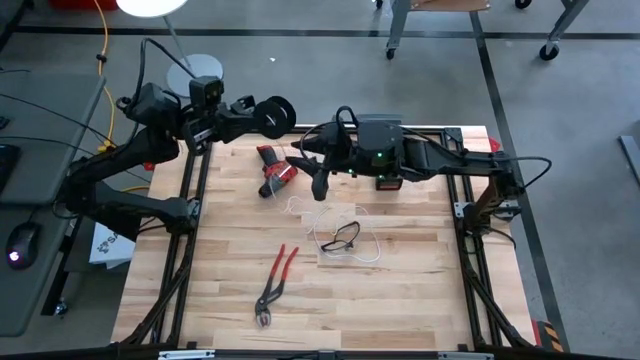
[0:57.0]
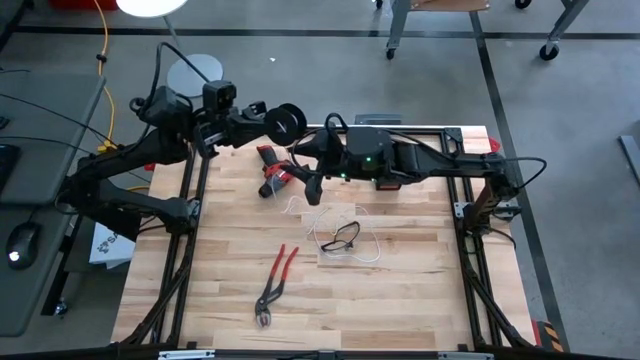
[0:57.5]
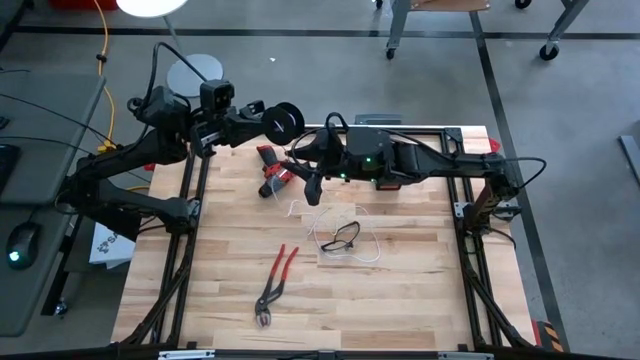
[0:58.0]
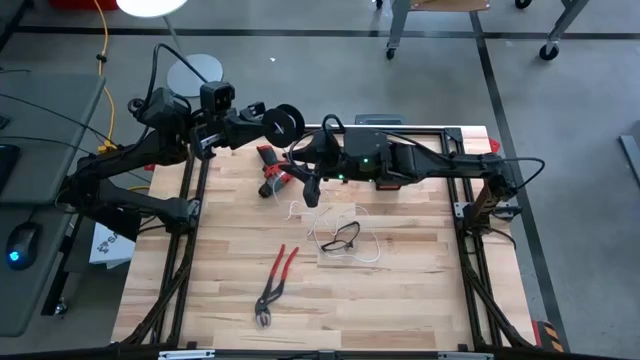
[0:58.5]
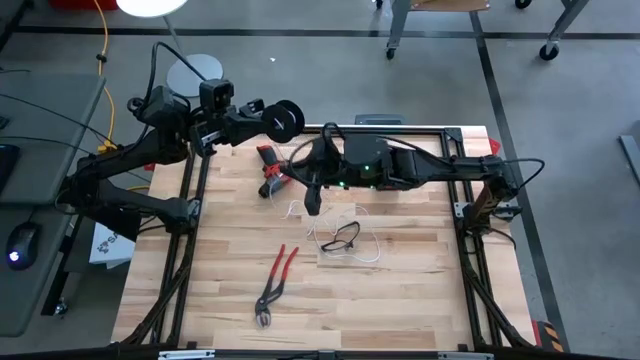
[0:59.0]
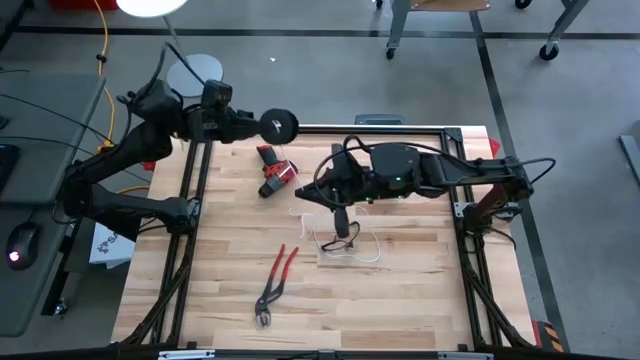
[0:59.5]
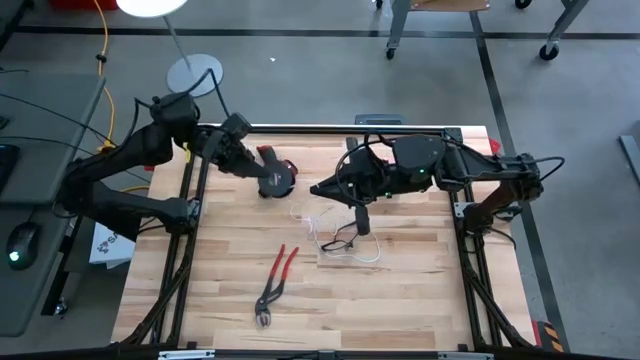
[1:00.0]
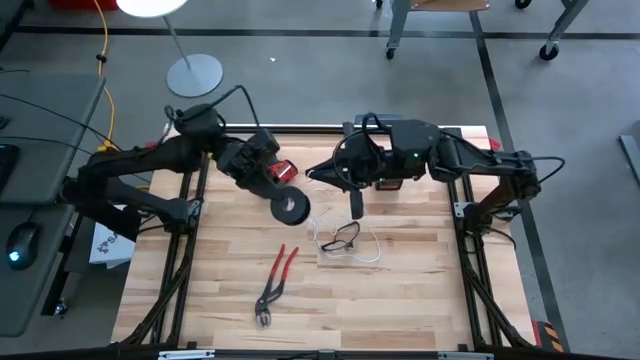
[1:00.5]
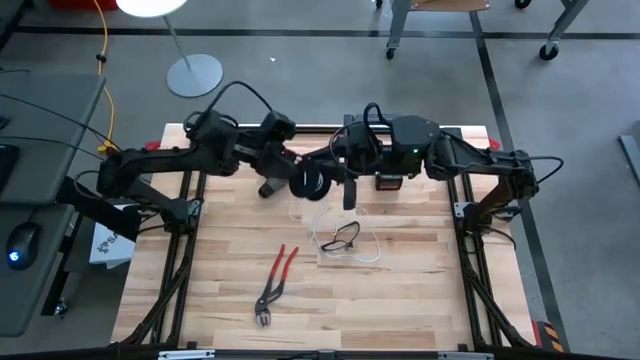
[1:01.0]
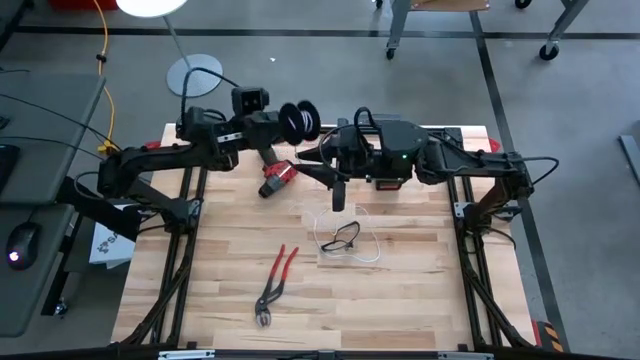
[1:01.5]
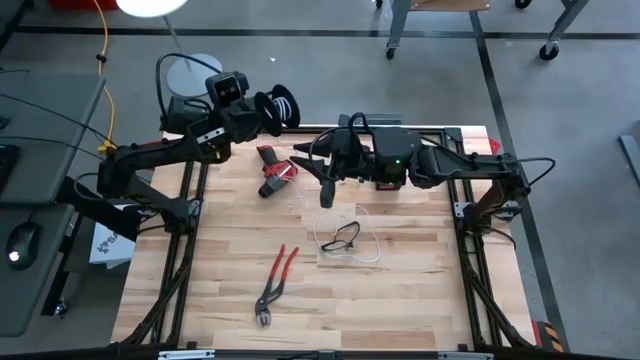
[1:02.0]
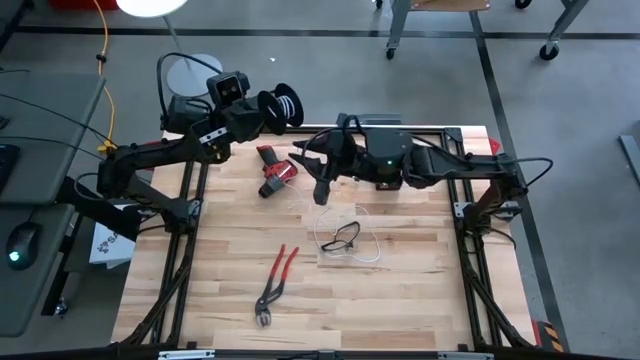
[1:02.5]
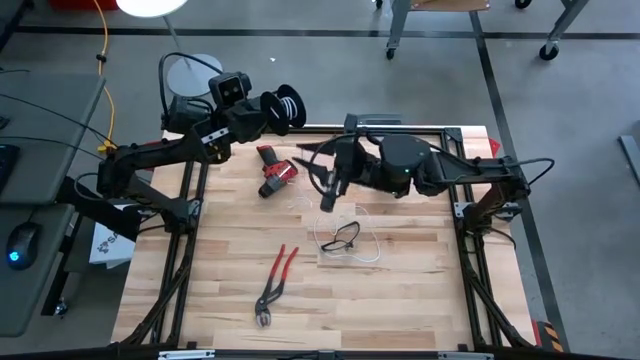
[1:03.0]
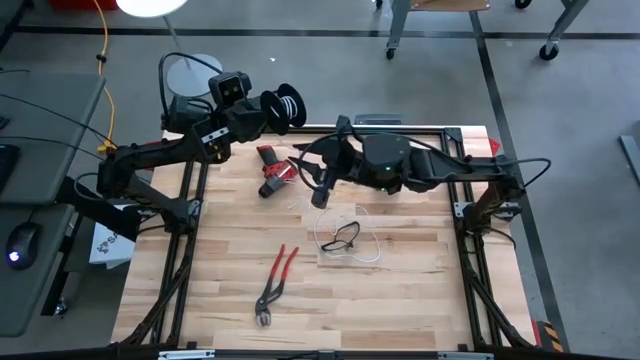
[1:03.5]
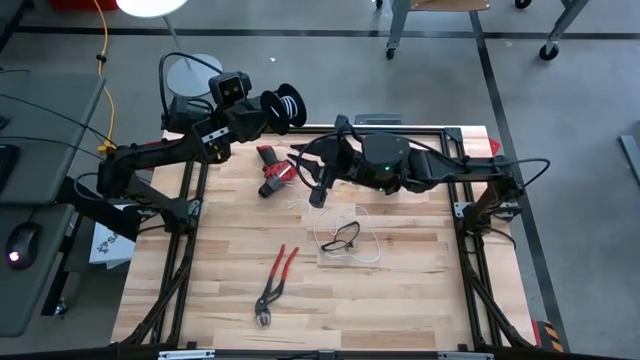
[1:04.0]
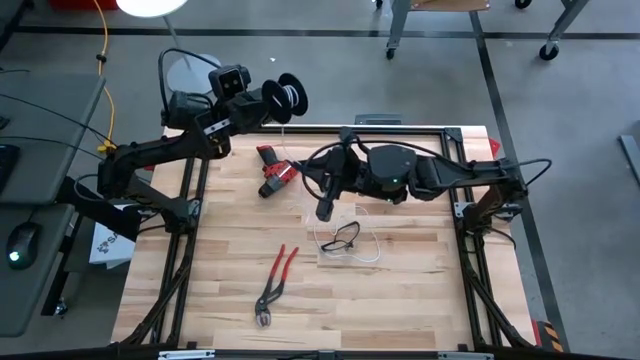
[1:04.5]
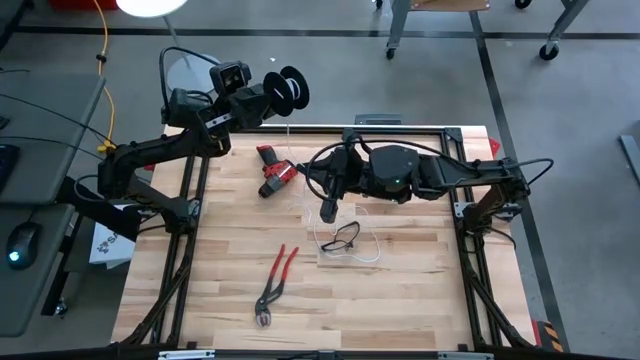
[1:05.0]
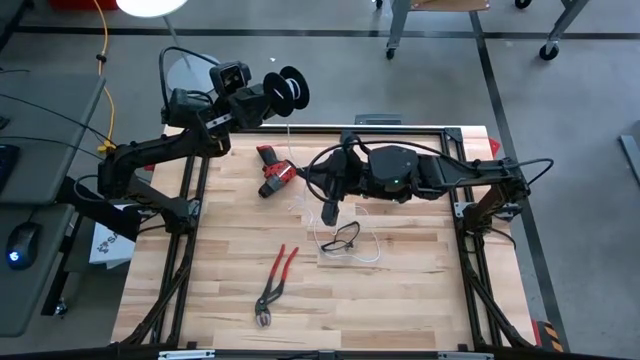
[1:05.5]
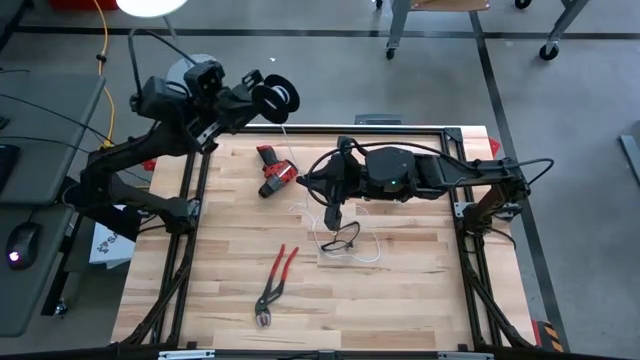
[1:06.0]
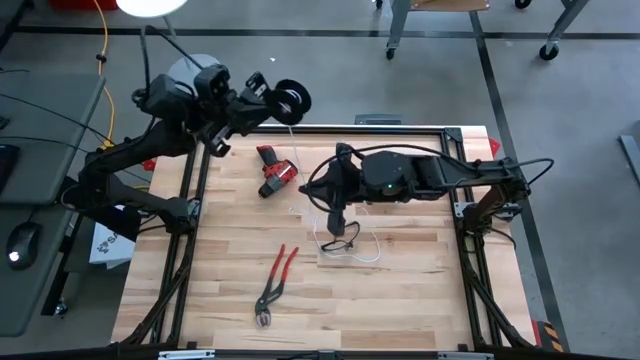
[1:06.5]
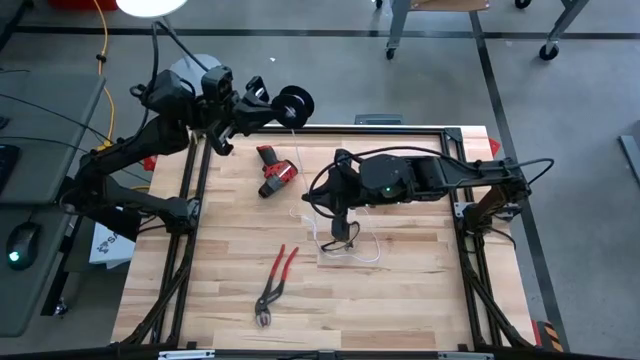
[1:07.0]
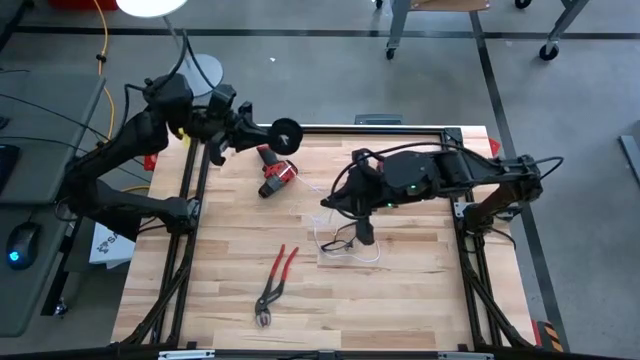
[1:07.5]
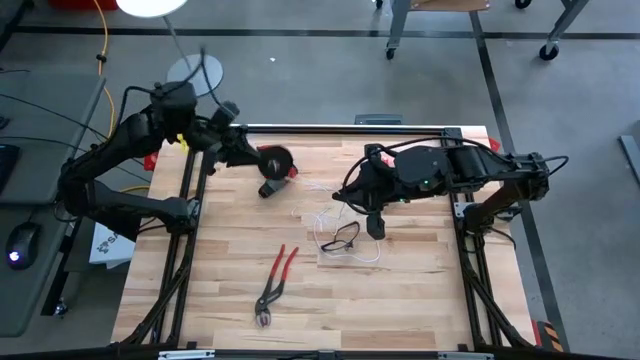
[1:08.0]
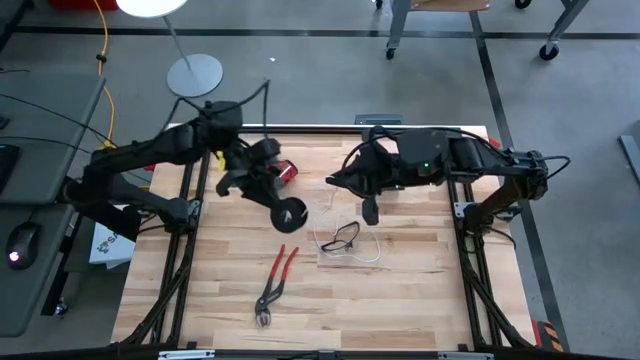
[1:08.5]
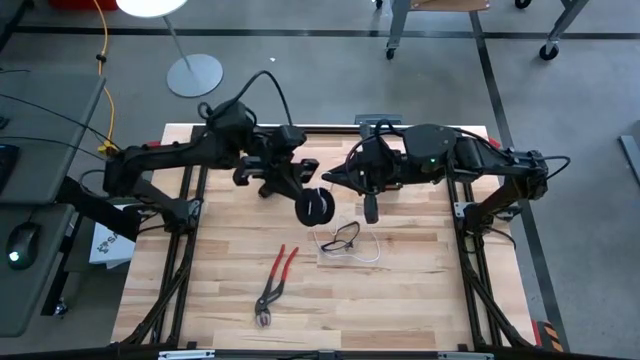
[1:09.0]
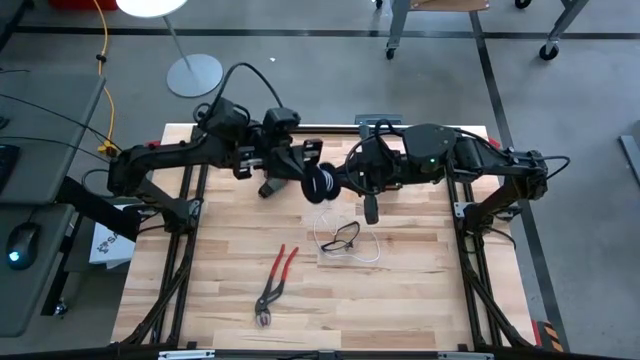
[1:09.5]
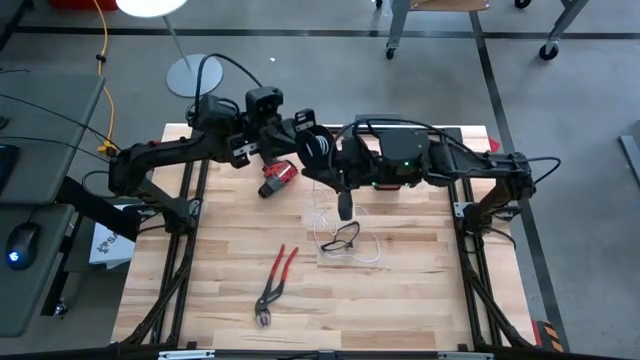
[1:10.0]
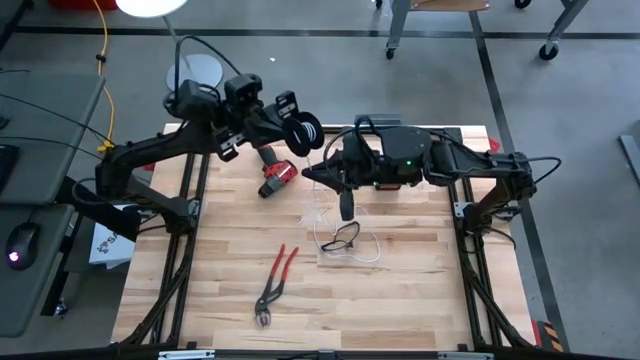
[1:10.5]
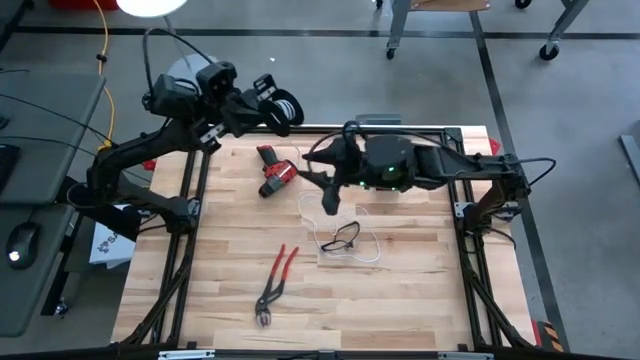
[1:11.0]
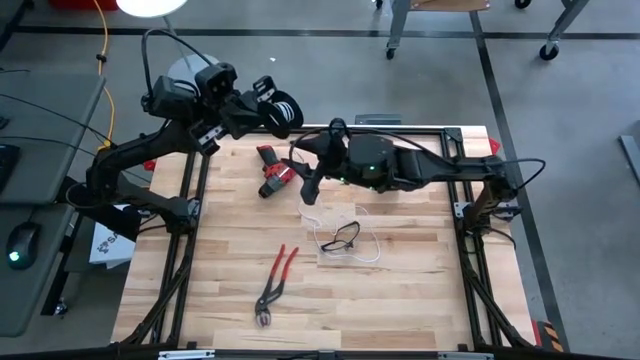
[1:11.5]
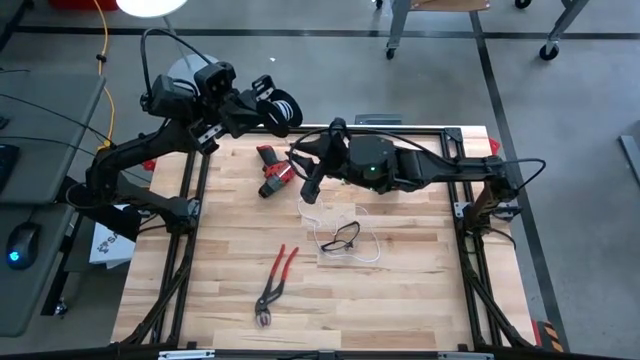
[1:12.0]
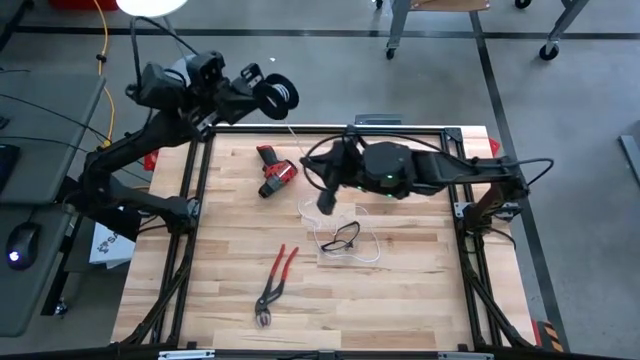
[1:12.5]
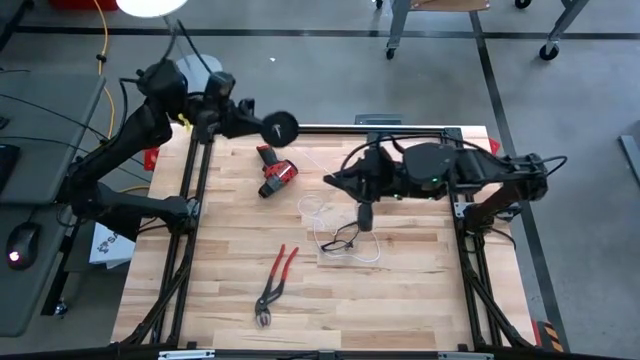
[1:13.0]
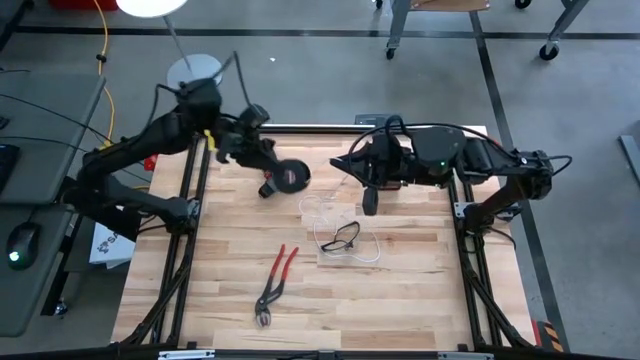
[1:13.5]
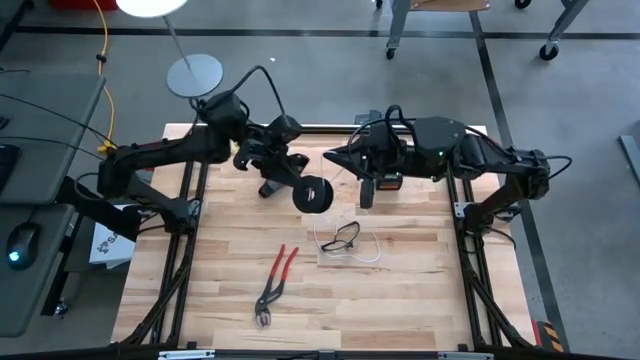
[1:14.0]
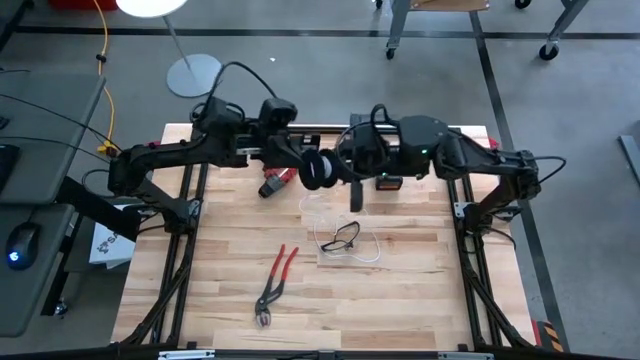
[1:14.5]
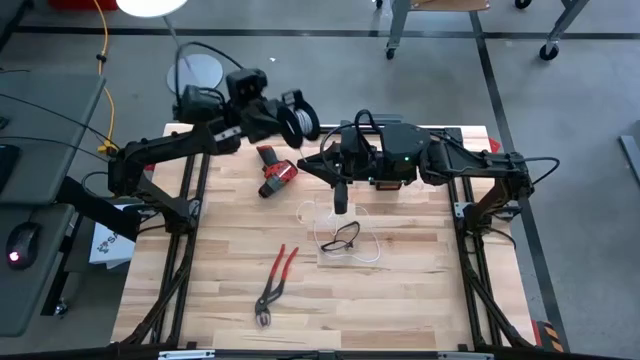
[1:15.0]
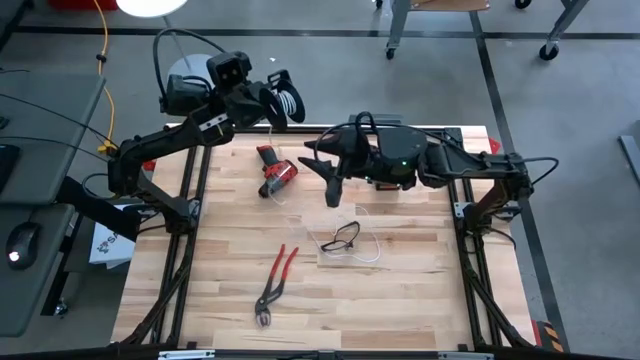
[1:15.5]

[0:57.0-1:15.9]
Task: Coil cords
Coil the white wire onto the black spool
